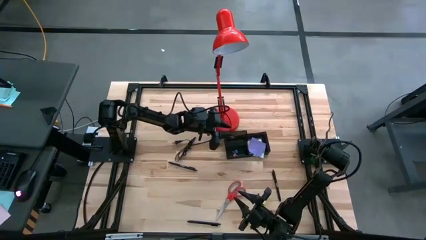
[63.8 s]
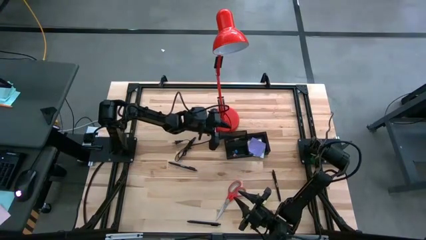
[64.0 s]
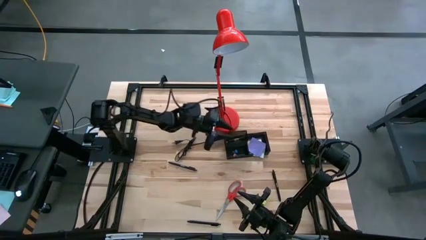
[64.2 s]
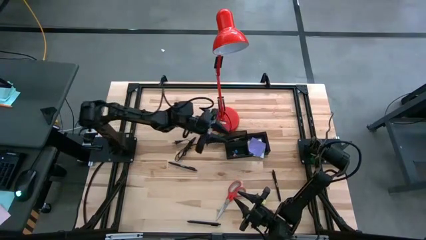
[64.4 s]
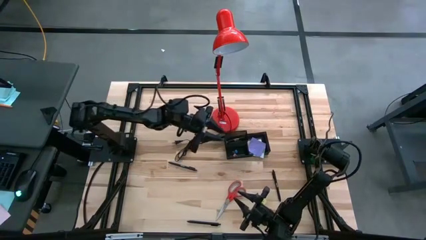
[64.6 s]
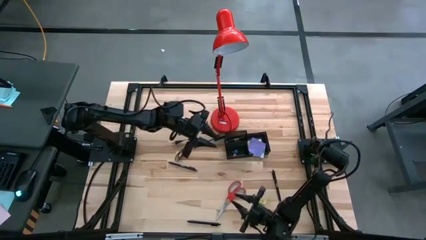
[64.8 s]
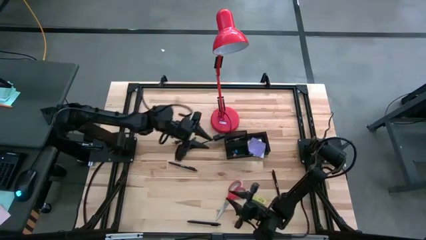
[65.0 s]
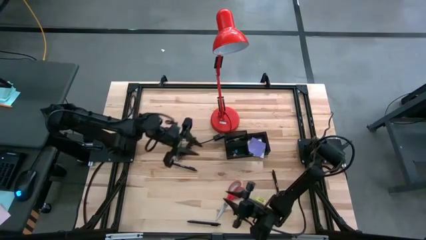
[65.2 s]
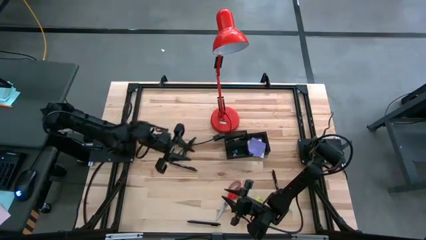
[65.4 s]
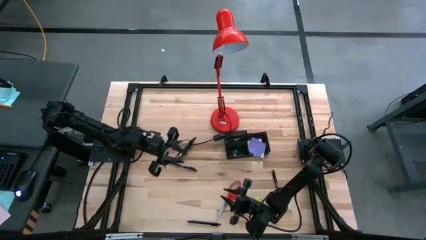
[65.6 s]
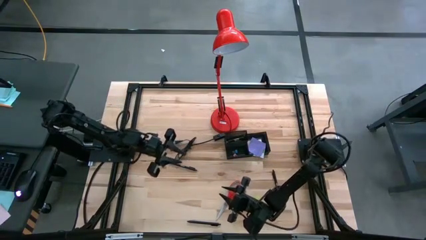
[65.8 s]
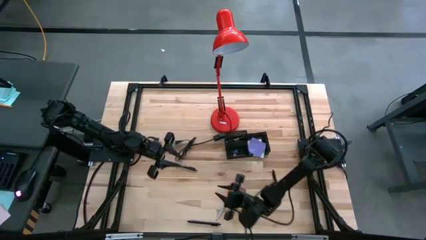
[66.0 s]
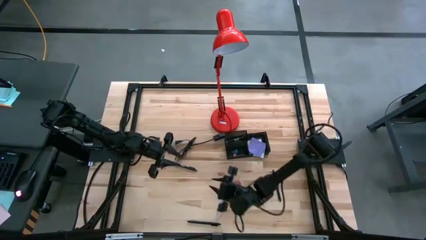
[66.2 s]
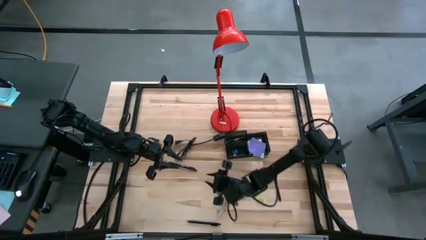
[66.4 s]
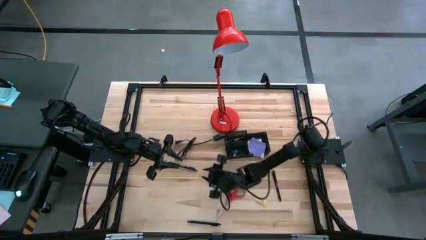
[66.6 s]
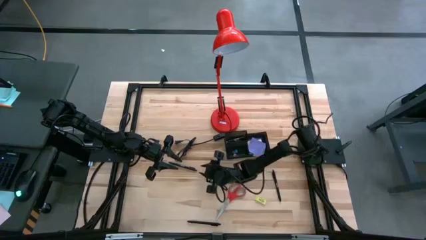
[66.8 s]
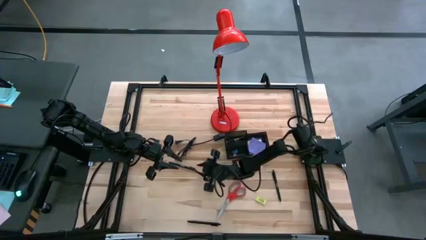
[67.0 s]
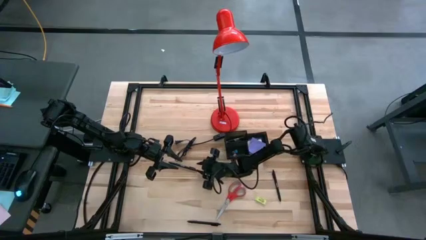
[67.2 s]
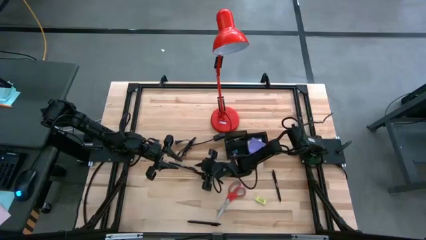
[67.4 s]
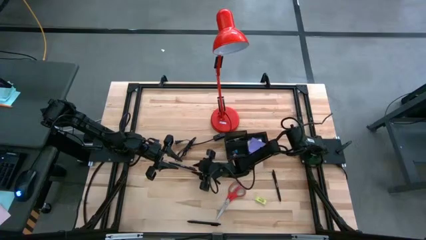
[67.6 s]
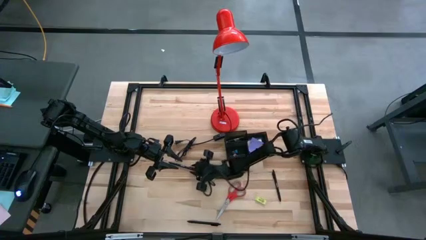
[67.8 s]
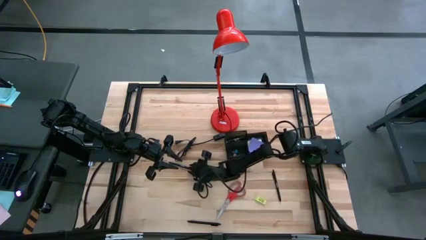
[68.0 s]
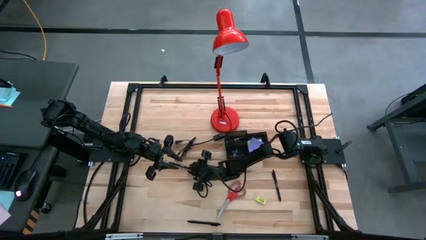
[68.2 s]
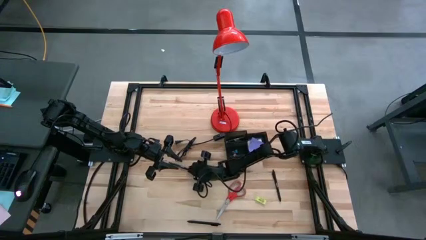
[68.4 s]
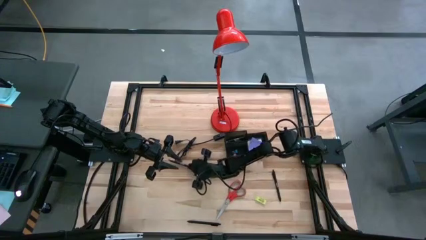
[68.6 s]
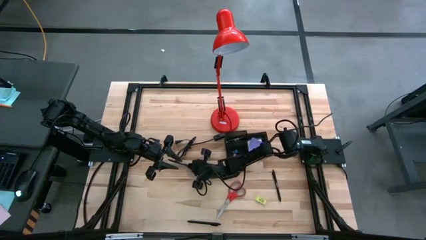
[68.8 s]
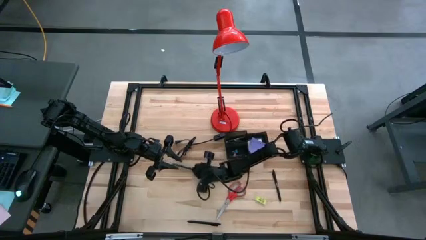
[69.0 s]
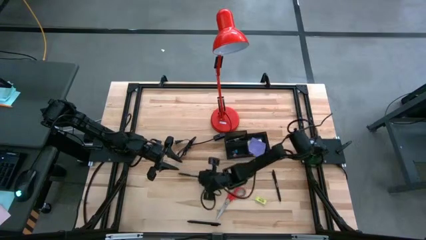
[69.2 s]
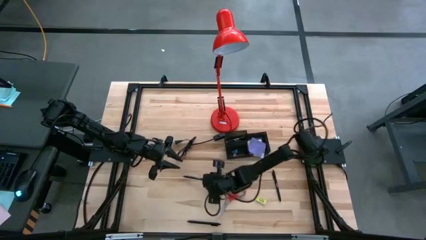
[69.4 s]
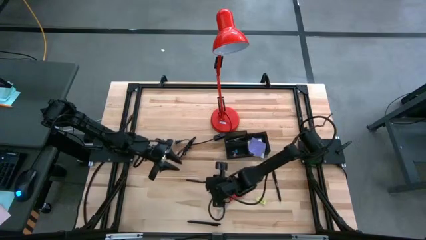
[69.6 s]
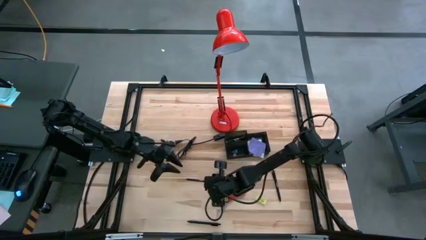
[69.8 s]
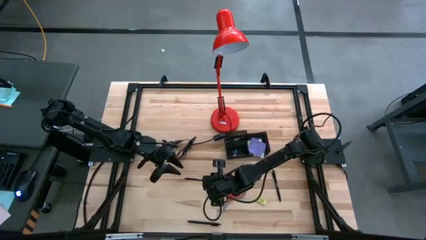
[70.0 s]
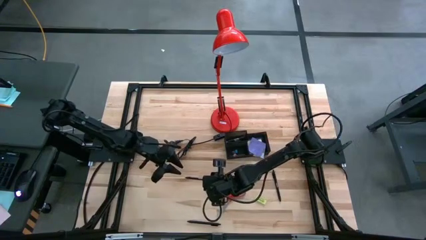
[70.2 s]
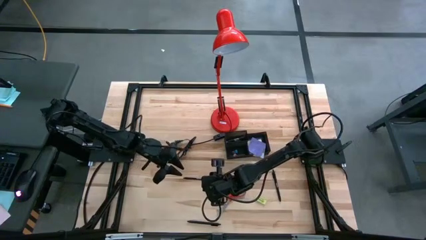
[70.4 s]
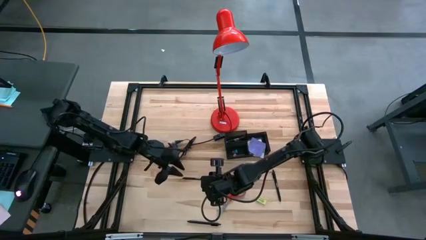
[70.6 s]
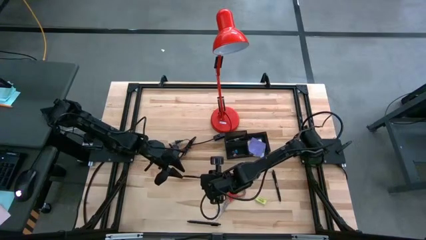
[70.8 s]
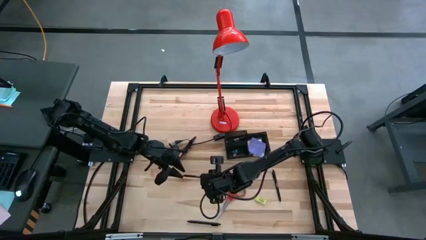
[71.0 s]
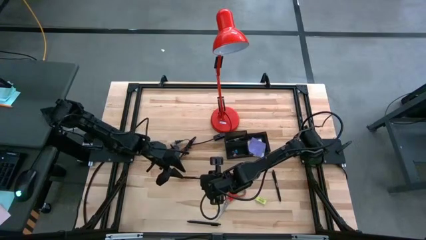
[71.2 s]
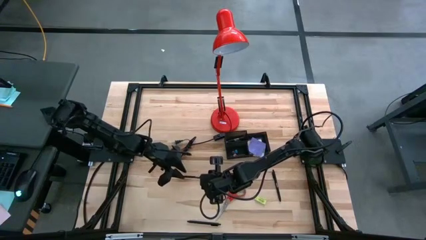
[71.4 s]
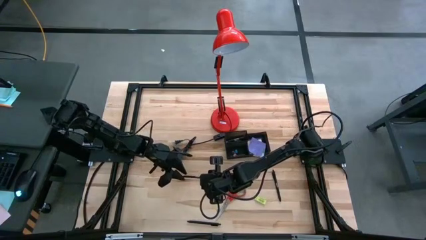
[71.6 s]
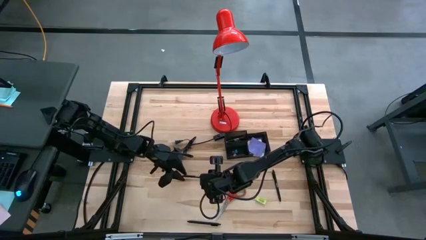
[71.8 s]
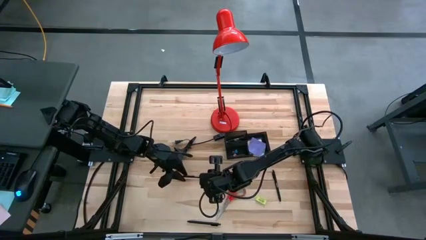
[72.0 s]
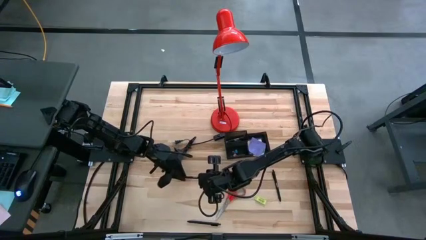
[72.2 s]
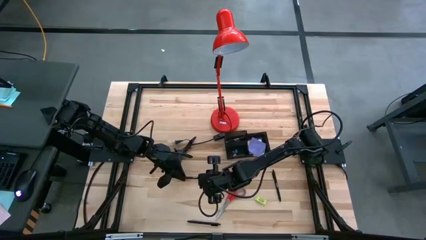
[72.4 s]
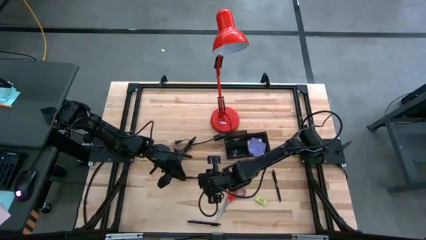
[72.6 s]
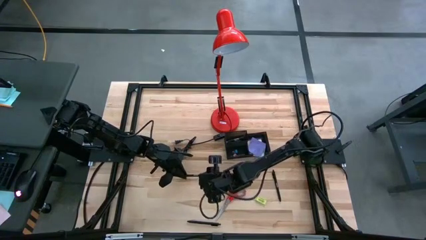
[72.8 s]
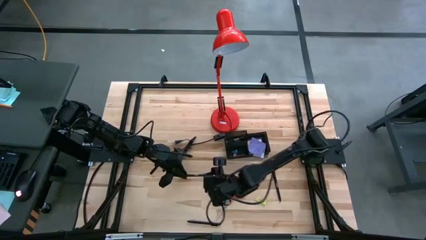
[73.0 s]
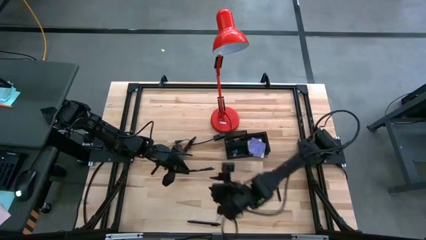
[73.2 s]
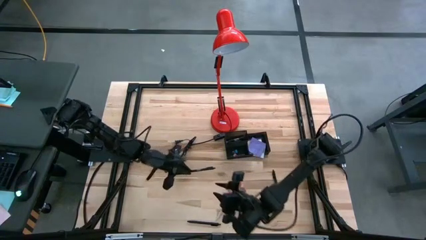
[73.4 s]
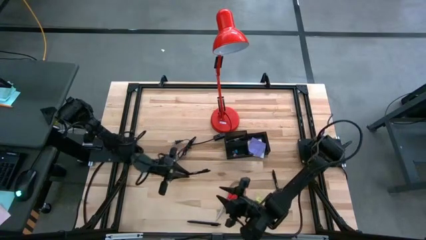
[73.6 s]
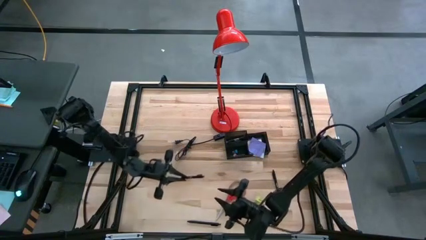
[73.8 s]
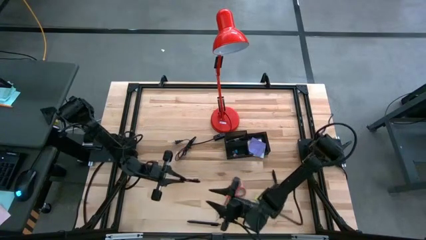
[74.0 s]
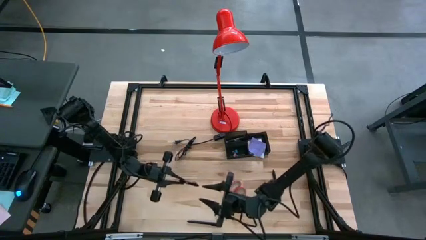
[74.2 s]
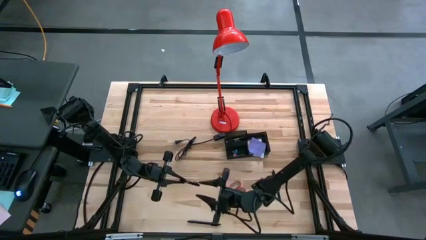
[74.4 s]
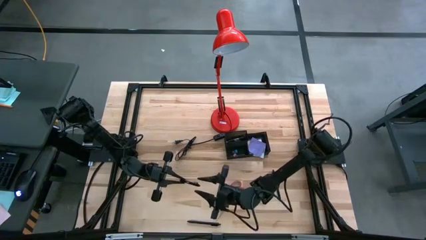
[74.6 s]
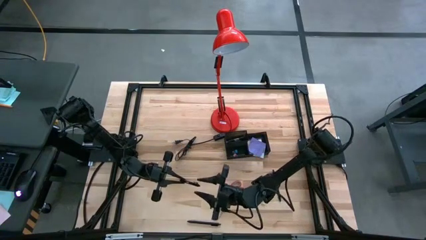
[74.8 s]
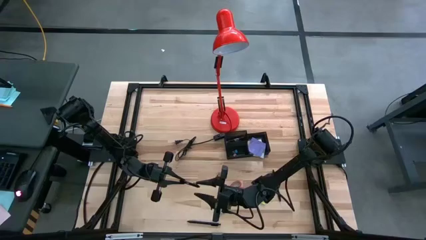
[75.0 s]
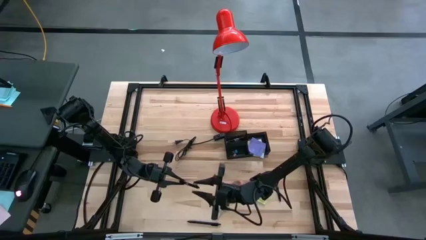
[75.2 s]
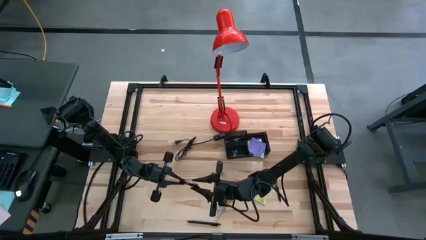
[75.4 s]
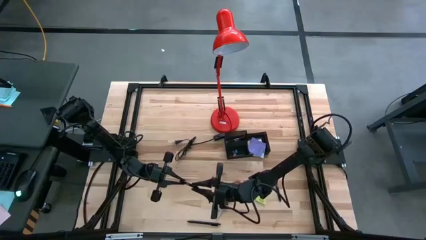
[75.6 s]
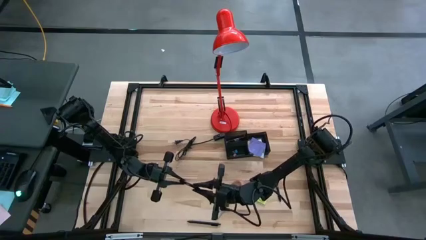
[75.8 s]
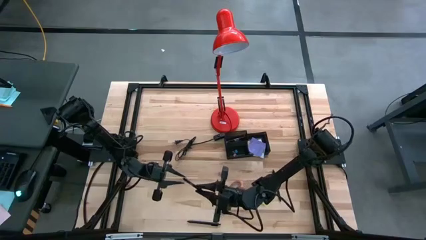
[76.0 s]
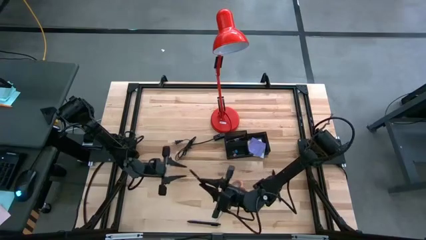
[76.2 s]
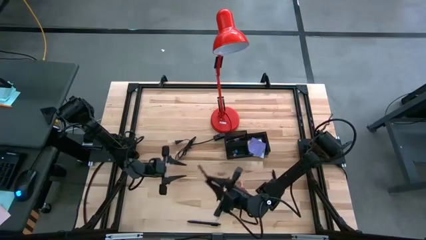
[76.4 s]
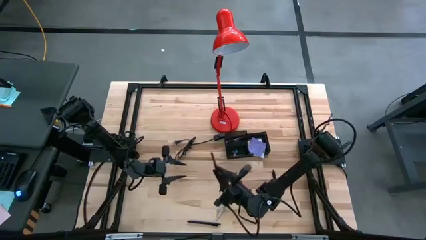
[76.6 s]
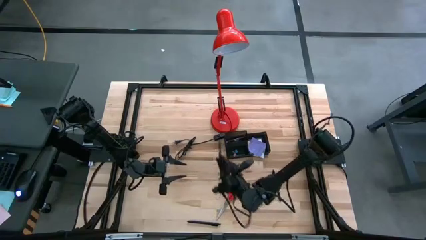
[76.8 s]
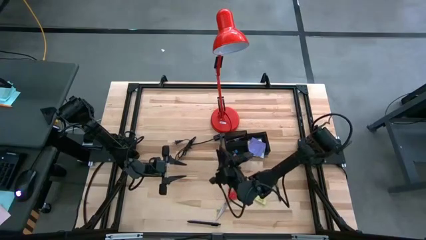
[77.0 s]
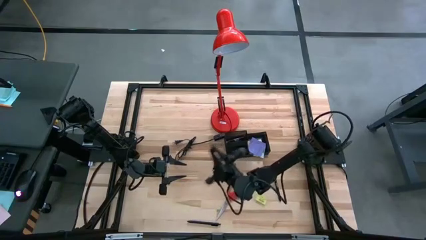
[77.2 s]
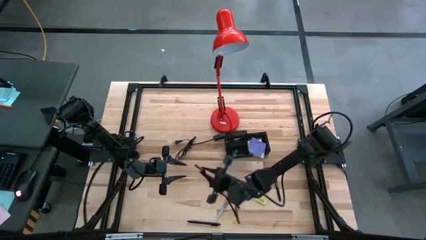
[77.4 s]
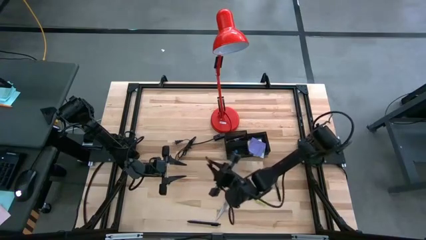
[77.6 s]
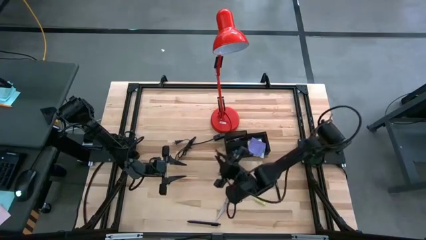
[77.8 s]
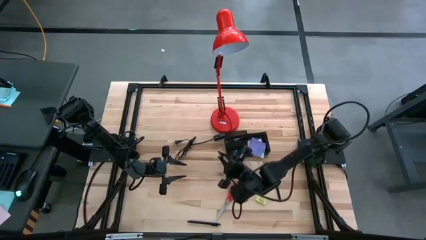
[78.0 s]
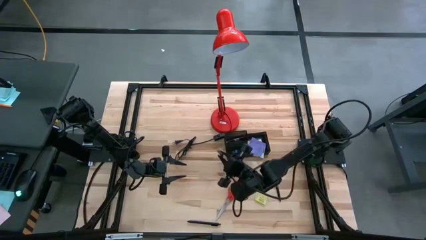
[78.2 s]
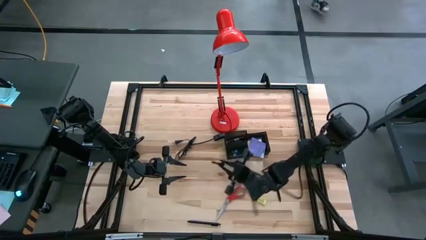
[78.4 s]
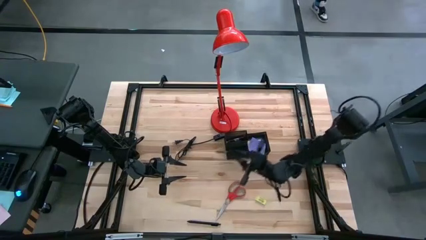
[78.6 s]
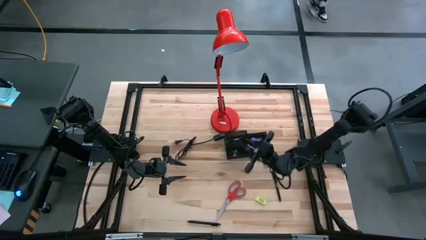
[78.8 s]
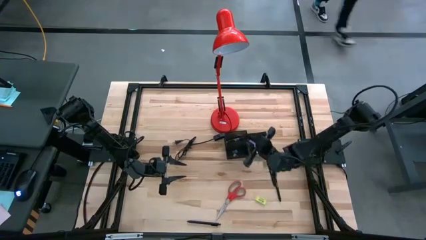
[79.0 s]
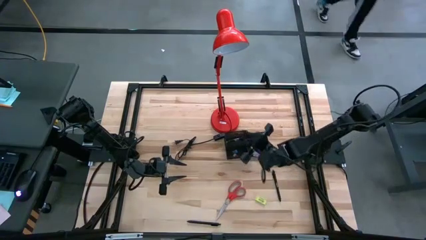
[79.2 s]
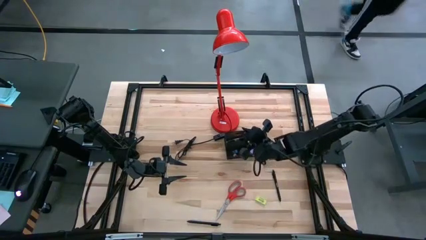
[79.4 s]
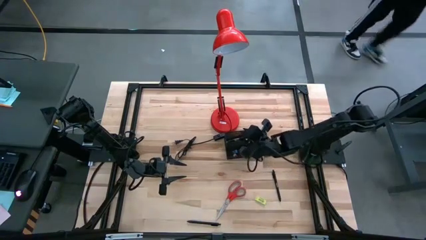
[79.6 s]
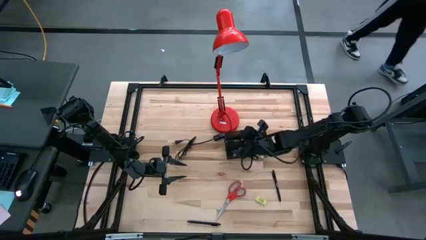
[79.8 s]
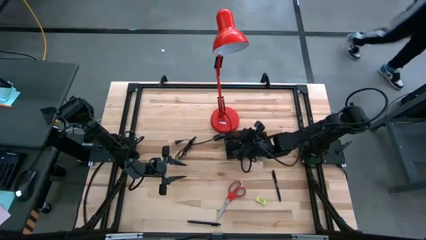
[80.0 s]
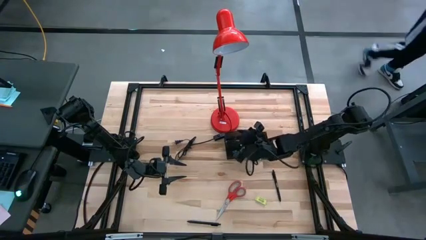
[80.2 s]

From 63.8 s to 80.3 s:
Task: Pick and place office supplies into organizer
Put the black pen into the desk organizer
